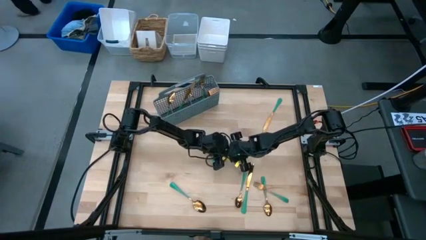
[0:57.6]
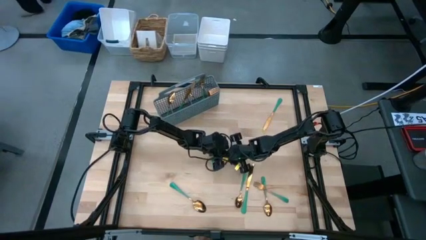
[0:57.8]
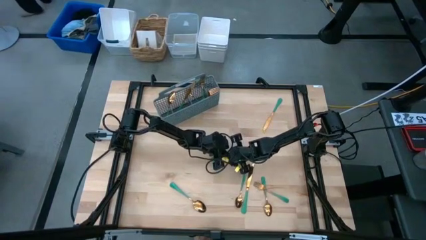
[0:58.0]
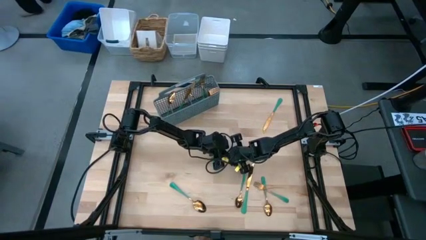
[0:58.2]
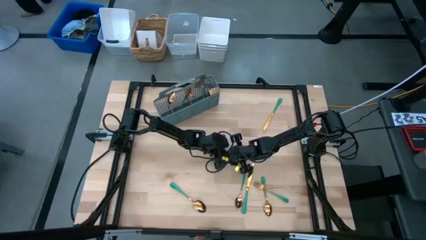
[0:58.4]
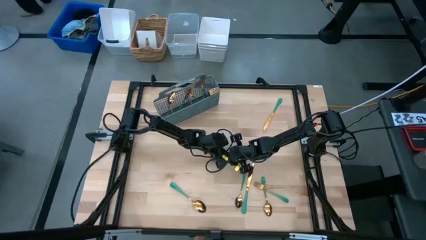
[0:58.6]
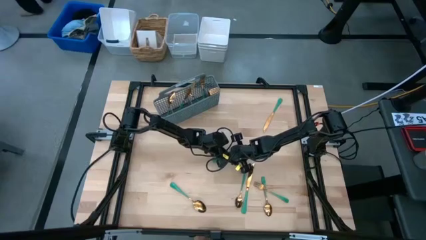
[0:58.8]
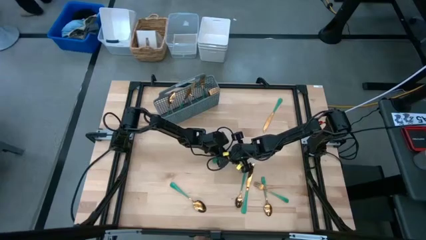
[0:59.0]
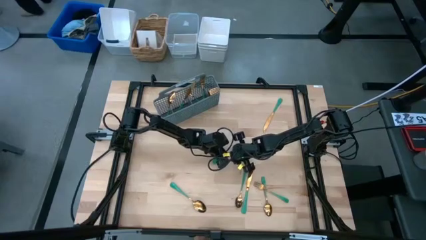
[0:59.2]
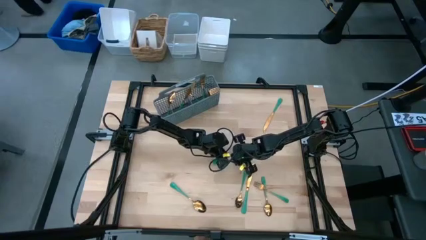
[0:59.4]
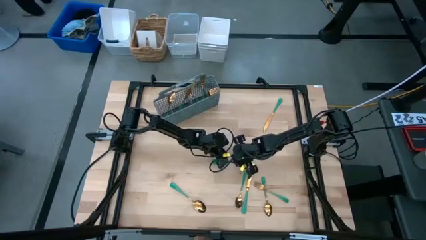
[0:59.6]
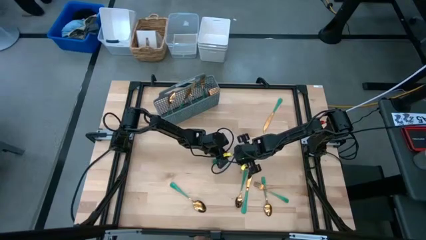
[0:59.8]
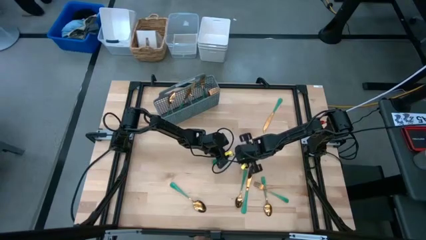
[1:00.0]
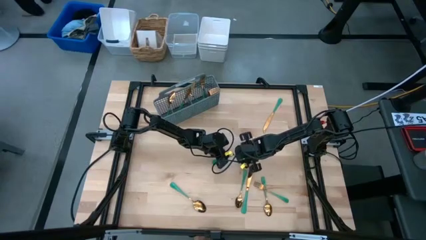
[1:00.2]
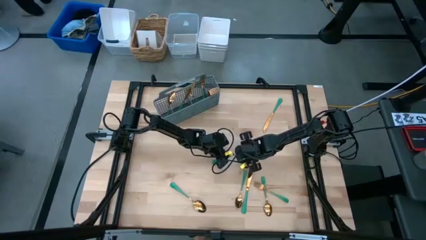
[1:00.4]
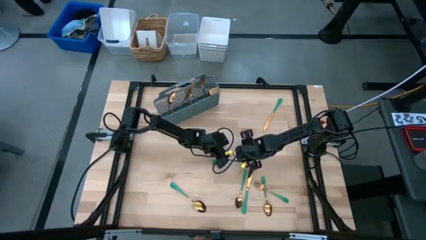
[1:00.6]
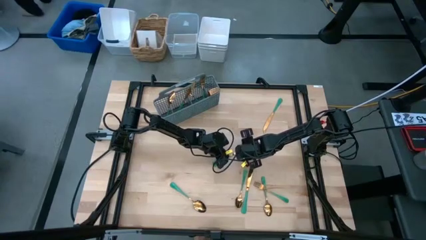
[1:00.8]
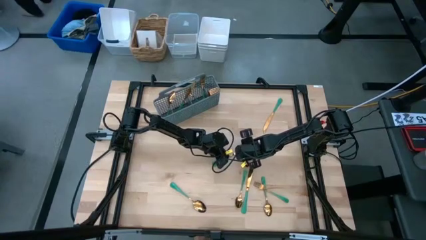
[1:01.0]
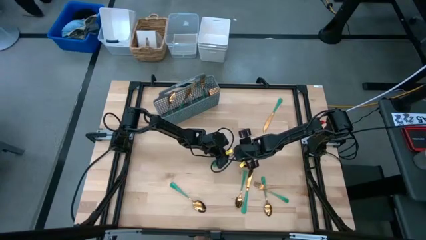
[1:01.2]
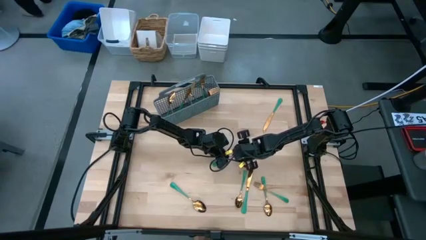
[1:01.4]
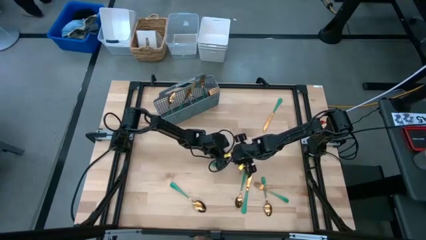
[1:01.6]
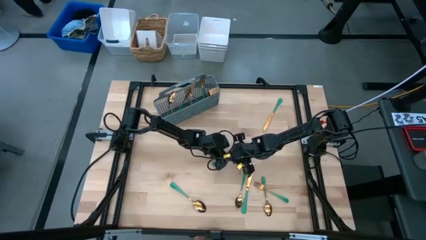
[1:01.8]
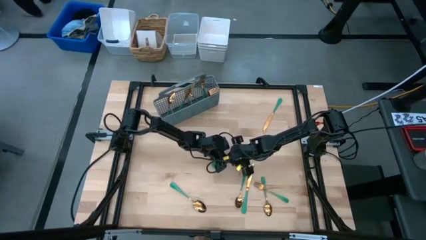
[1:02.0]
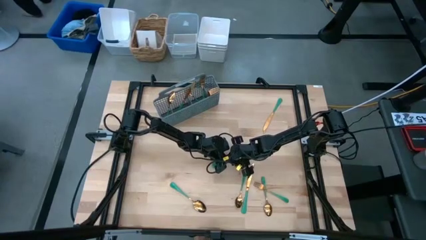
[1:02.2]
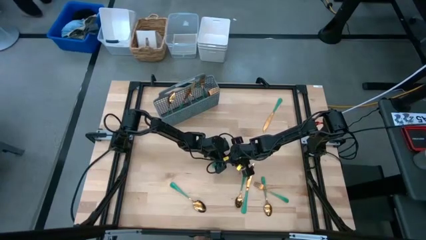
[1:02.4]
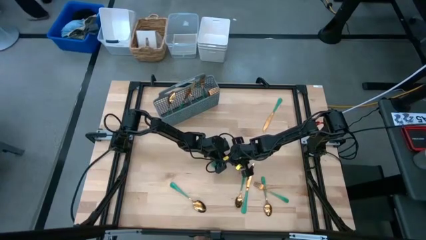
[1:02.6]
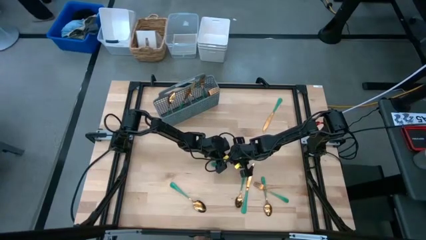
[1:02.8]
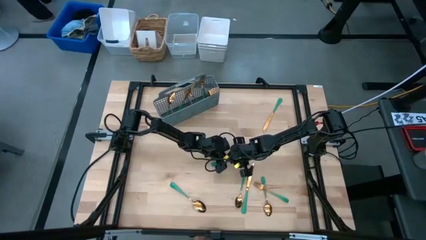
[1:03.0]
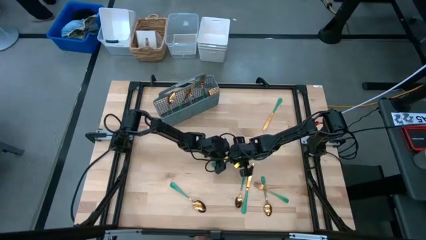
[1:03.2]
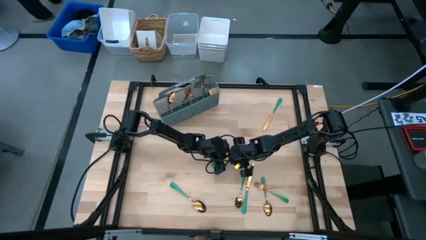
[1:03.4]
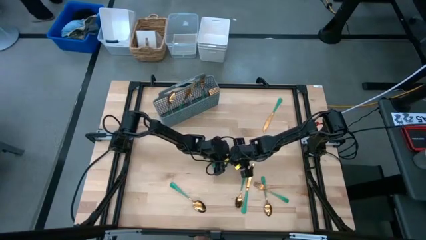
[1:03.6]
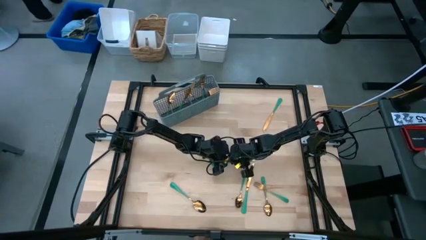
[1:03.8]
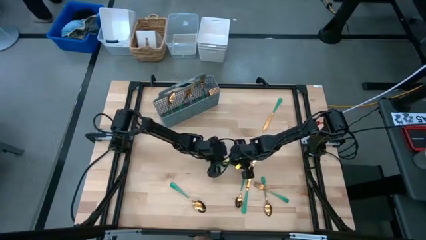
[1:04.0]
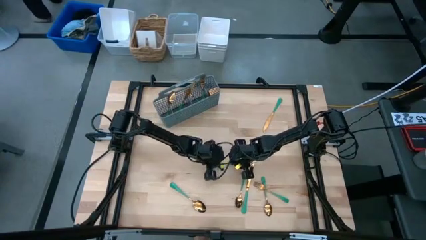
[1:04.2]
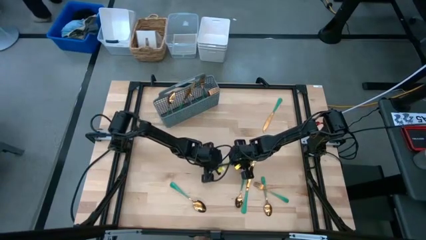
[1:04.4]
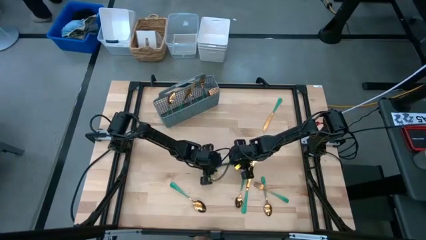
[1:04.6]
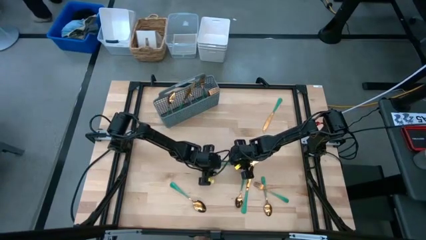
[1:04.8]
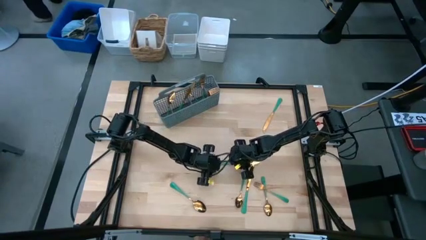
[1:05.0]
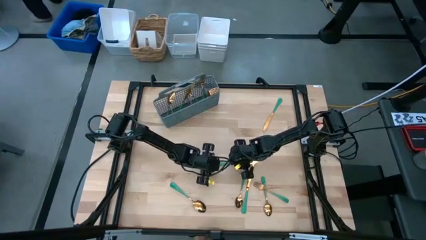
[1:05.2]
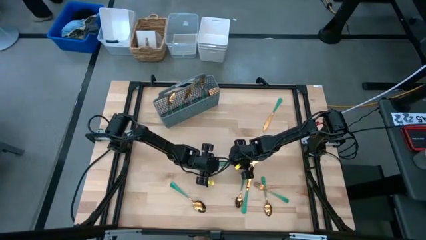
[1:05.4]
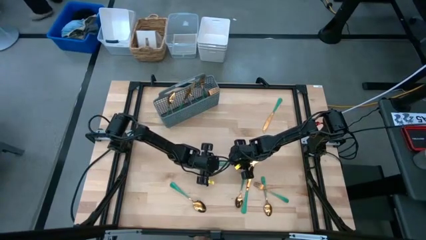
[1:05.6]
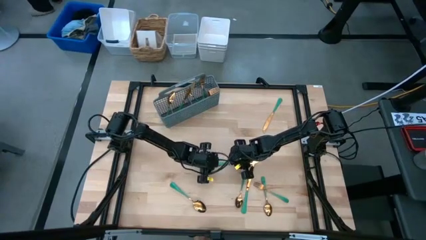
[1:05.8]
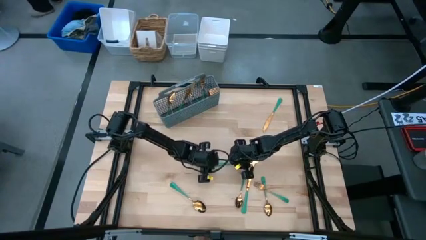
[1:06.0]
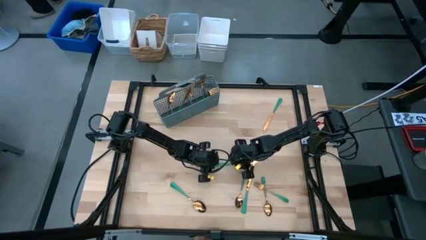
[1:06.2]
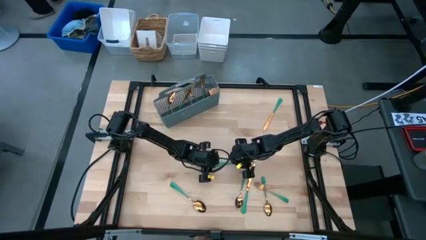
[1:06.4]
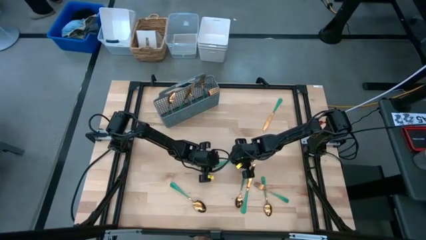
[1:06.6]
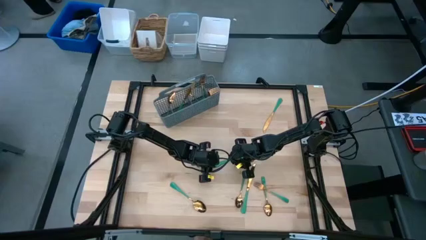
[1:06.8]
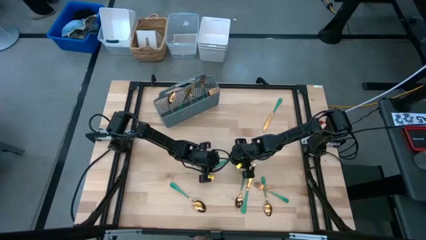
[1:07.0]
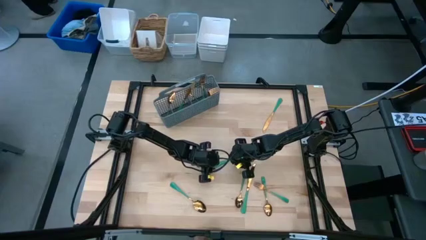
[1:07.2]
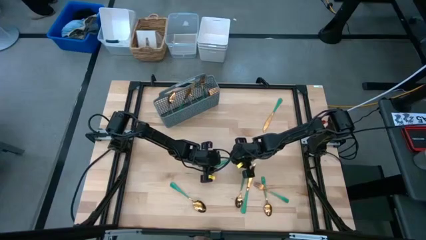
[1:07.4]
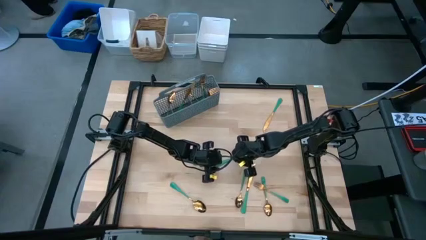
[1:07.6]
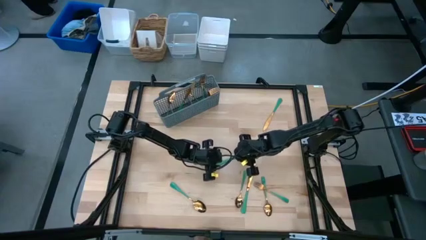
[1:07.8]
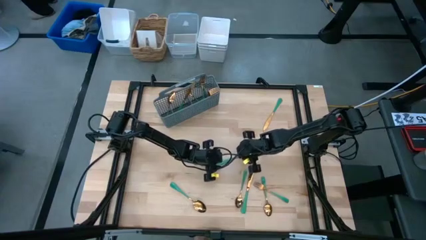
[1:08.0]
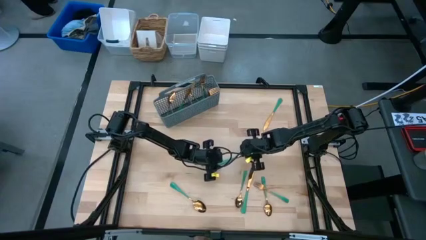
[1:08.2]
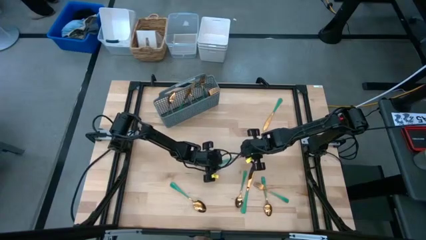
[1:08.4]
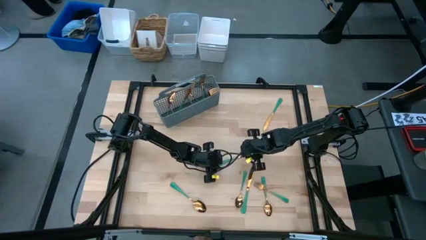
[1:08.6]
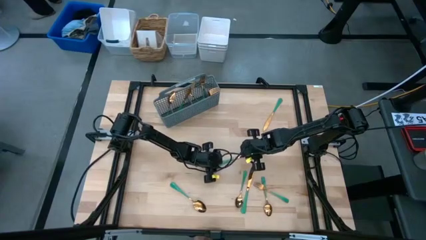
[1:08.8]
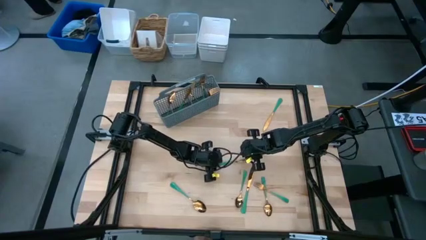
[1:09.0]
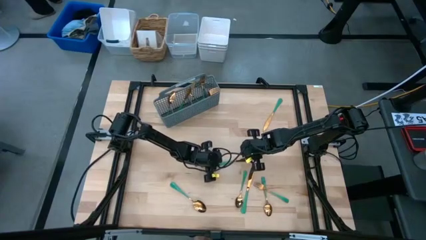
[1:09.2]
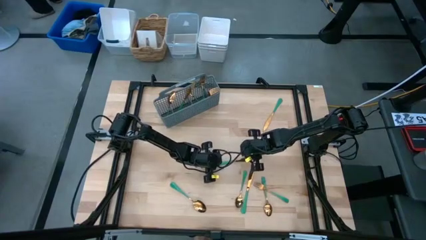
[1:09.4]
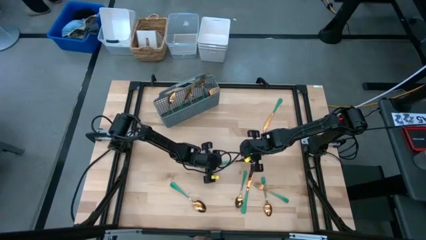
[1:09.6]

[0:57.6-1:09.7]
Task: Sort silverware
Put the knife into the middle left section of the silverware holder
